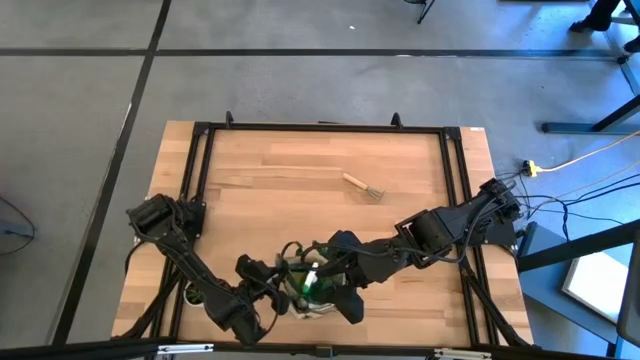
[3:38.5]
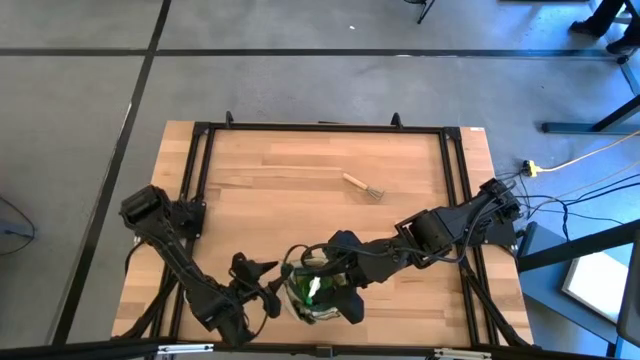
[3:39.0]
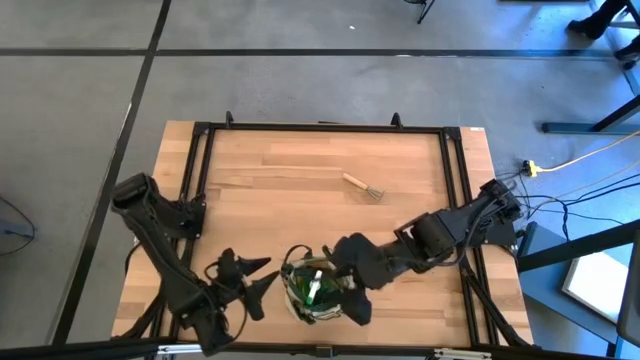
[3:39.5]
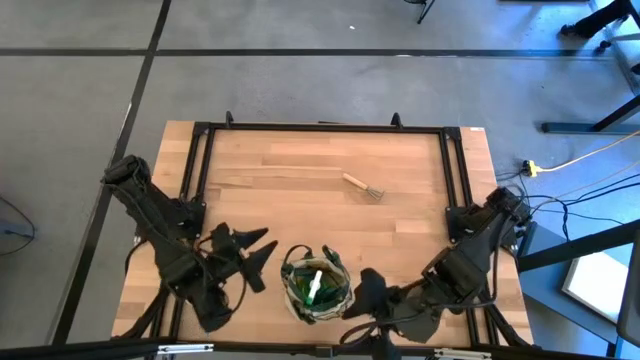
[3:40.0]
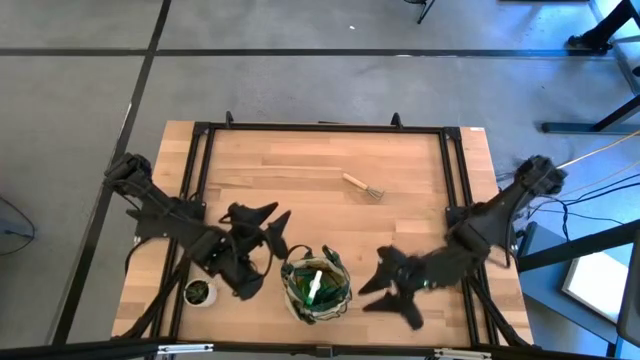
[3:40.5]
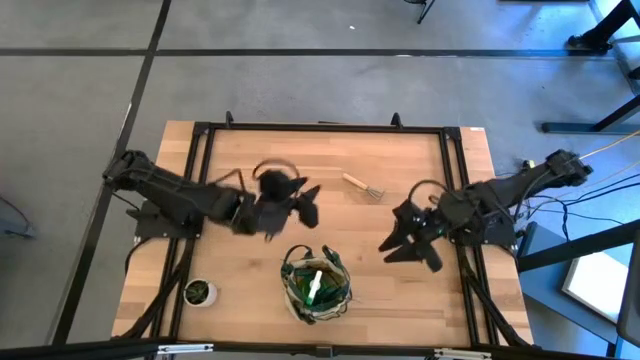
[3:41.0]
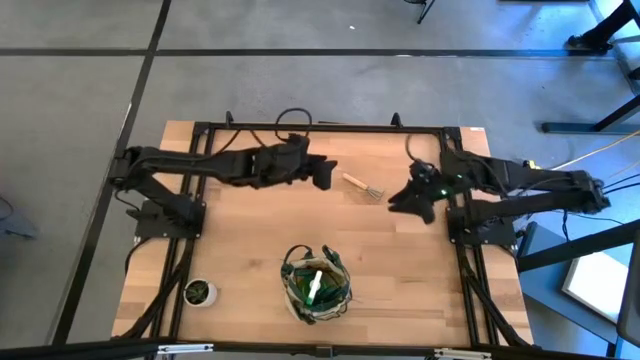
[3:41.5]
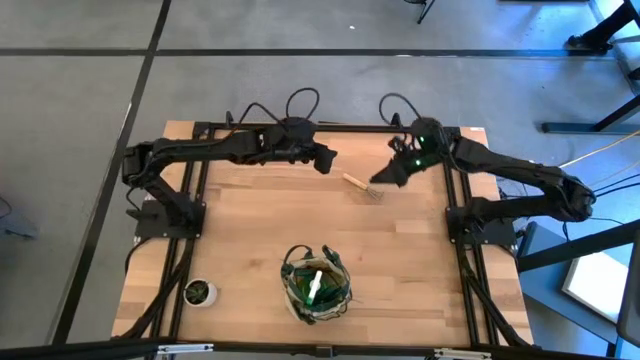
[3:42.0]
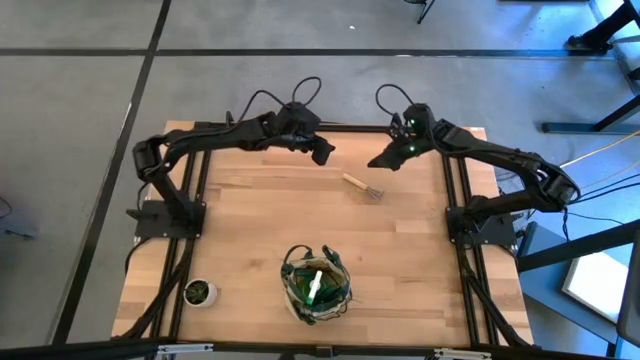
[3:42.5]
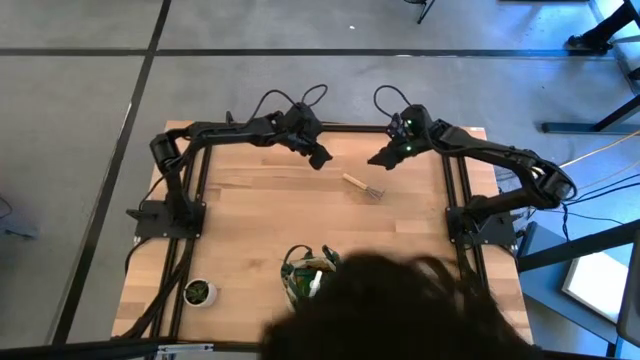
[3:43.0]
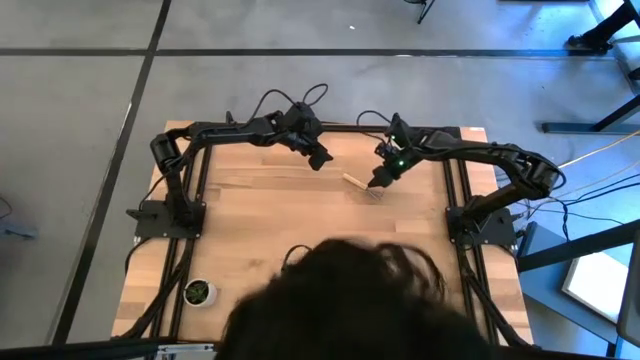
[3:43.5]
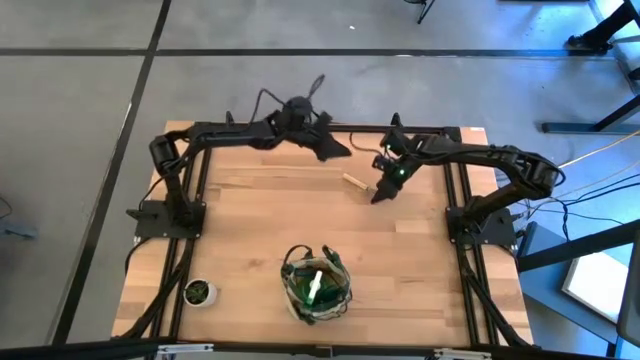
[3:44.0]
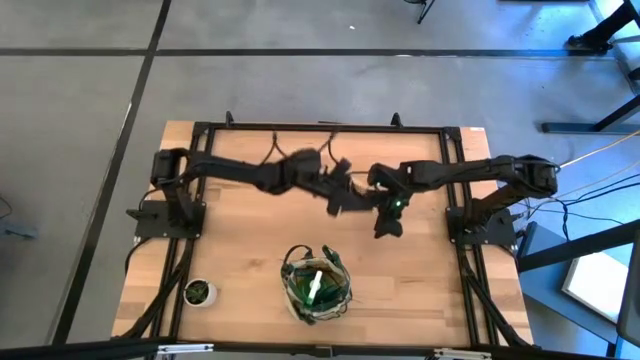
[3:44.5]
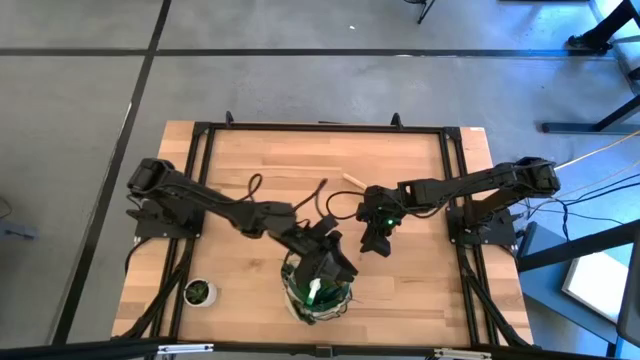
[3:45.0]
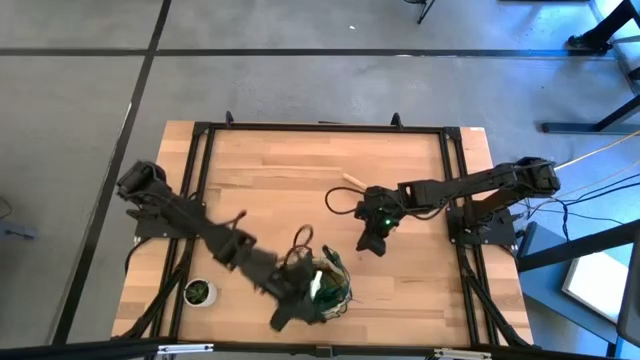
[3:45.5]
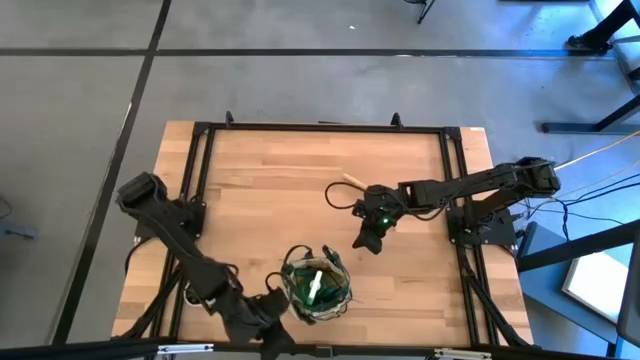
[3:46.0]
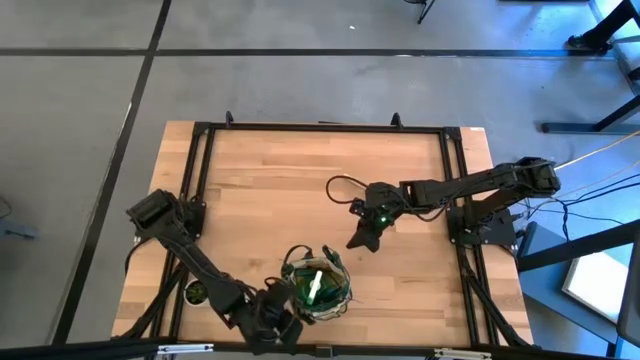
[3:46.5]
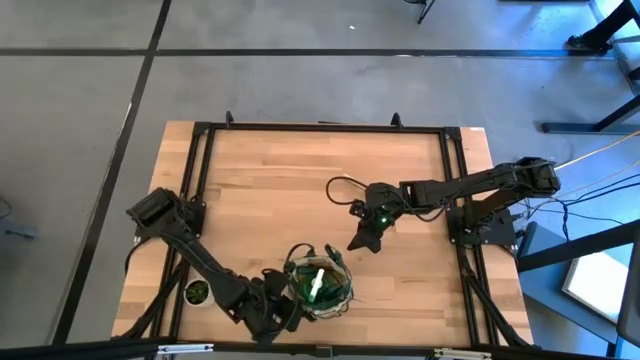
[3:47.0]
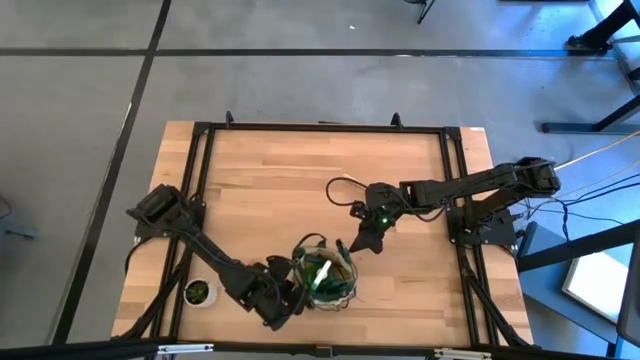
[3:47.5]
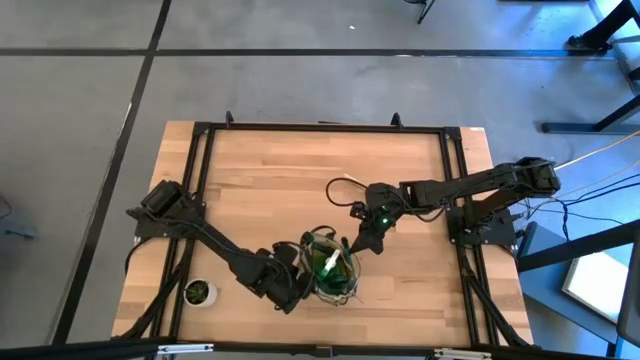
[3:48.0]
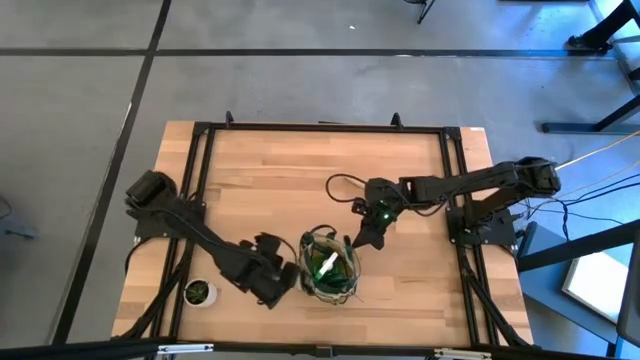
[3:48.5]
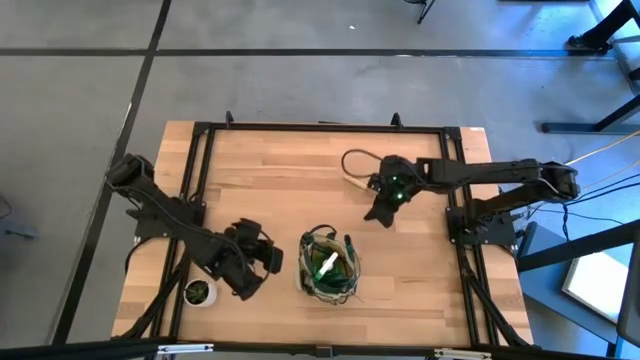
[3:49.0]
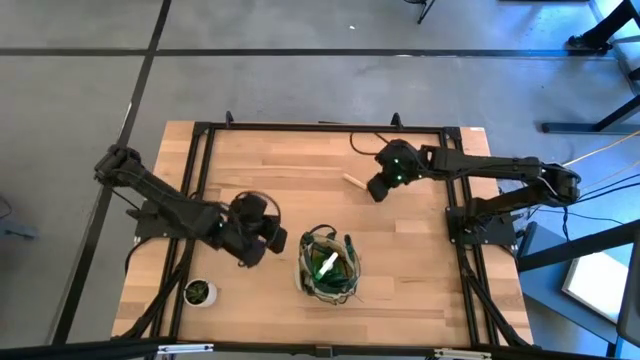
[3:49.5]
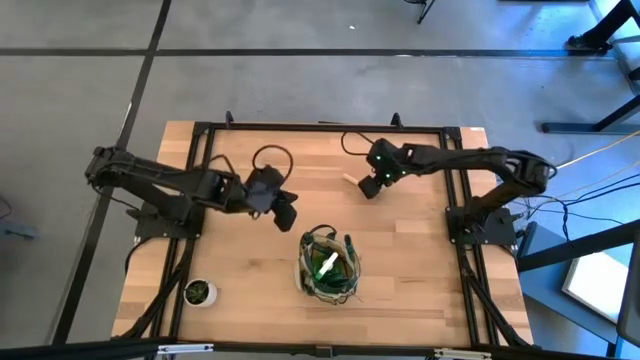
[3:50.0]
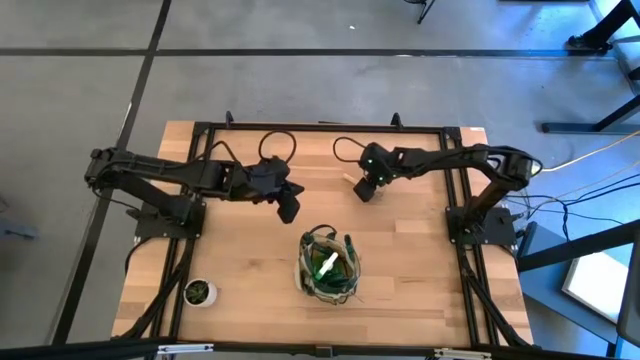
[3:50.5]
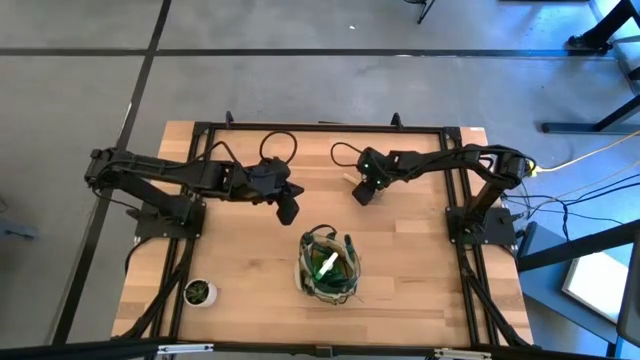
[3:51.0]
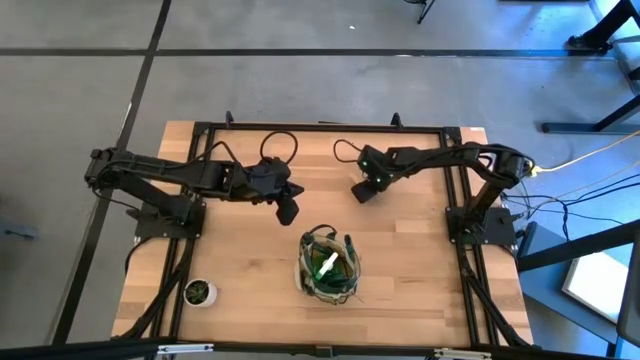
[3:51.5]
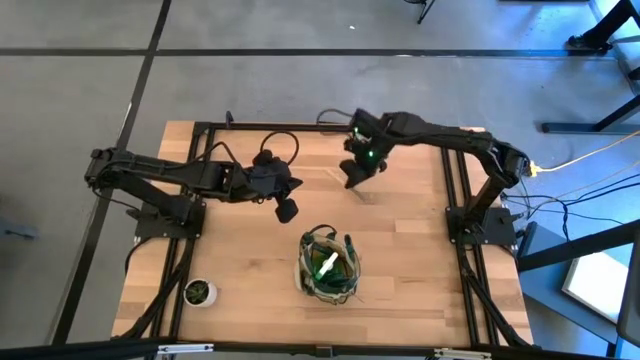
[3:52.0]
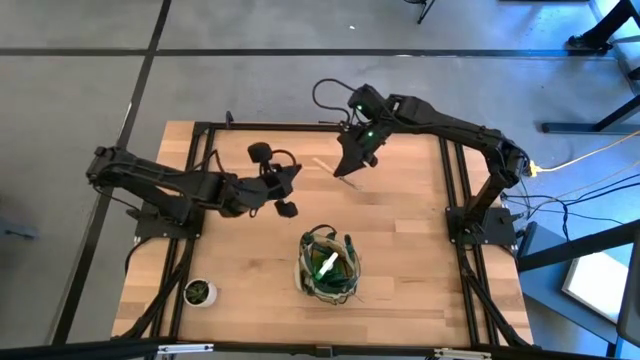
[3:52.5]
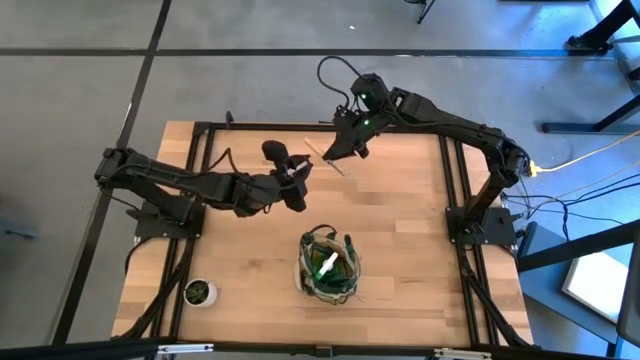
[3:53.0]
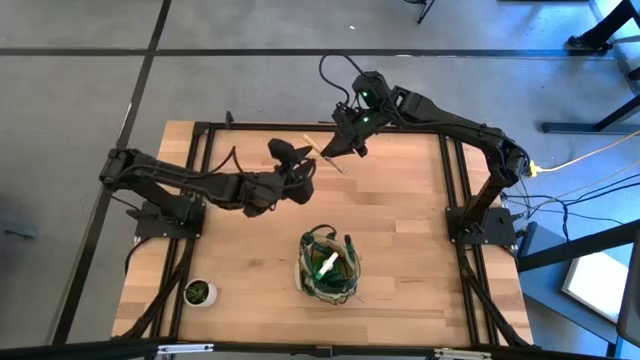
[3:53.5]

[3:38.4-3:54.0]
Task: Pick & Place Garden tools in Gardening bag
Put the brown hand rake into the gardening bag
